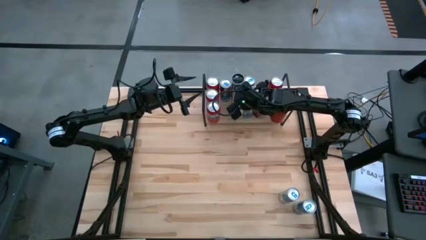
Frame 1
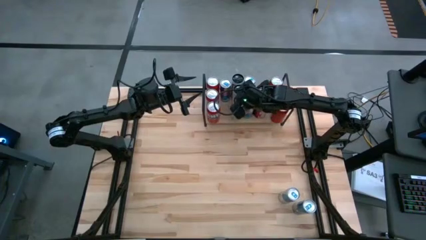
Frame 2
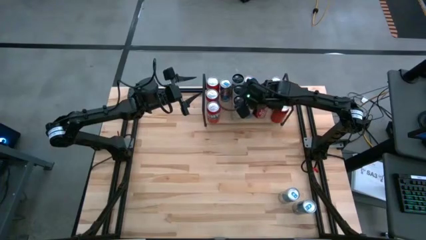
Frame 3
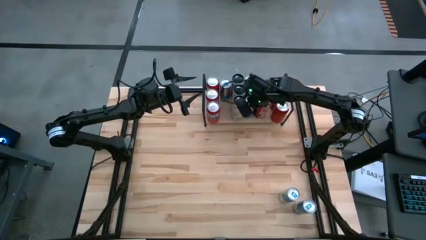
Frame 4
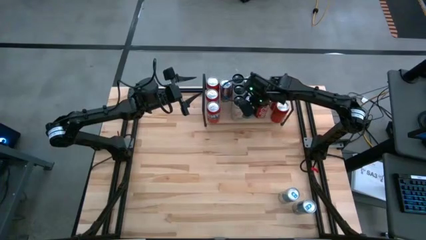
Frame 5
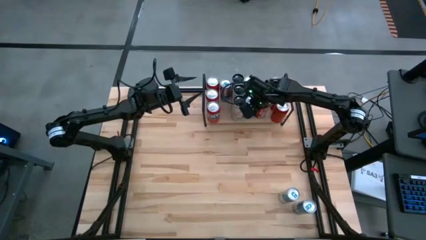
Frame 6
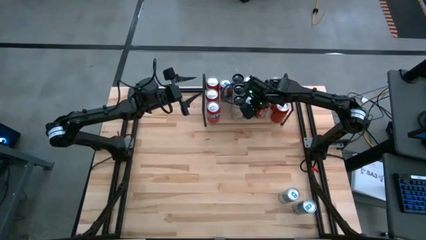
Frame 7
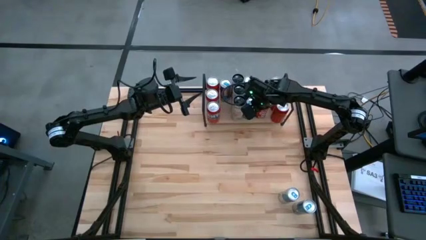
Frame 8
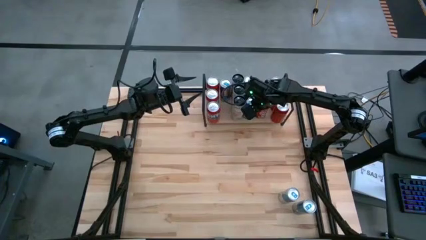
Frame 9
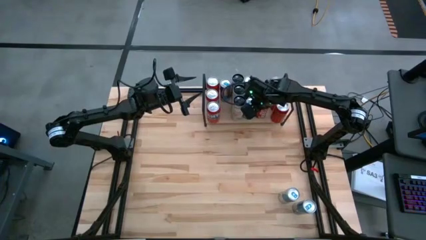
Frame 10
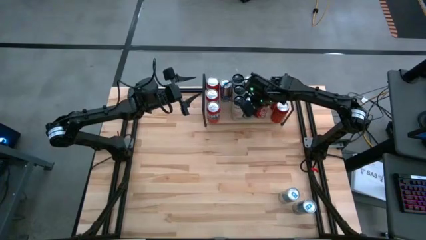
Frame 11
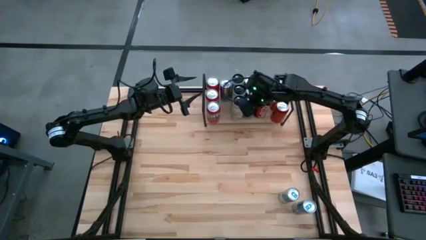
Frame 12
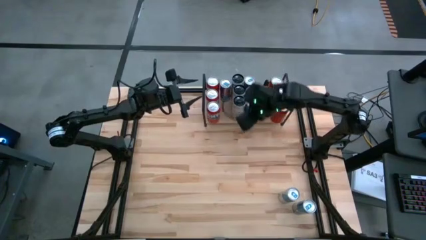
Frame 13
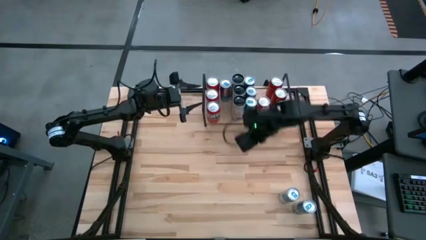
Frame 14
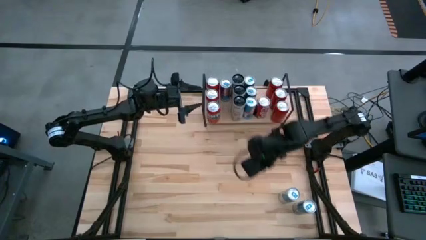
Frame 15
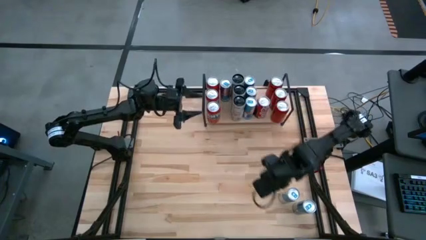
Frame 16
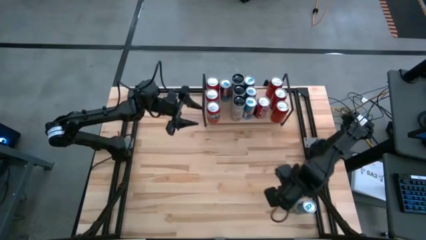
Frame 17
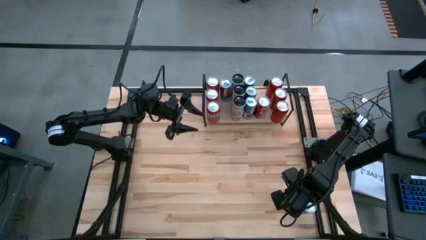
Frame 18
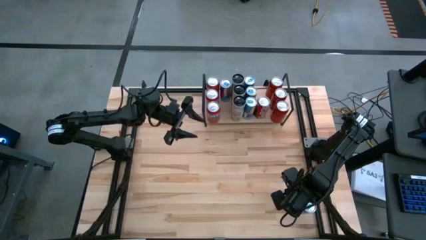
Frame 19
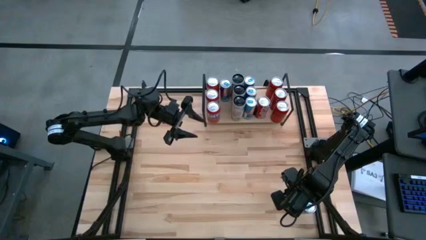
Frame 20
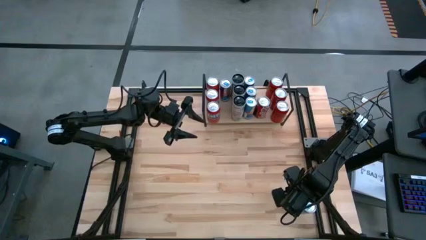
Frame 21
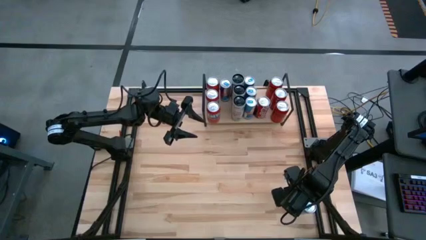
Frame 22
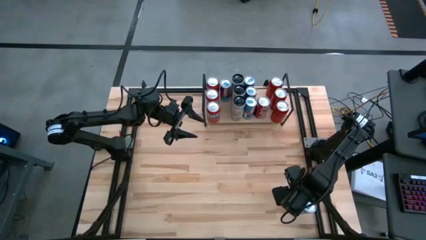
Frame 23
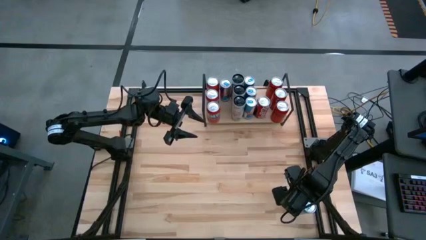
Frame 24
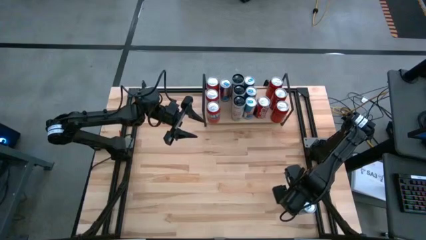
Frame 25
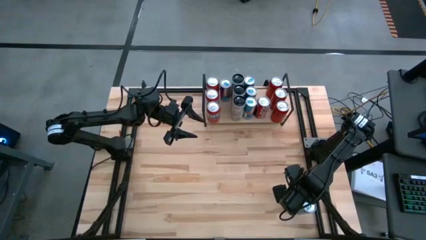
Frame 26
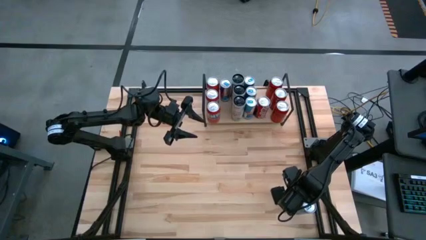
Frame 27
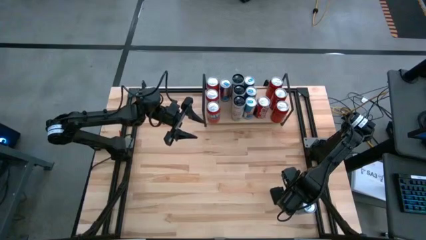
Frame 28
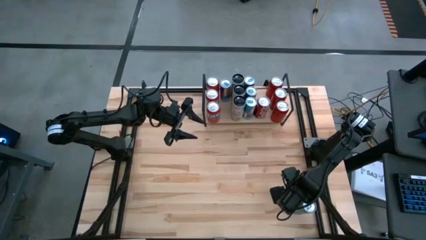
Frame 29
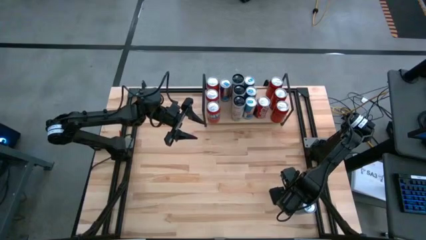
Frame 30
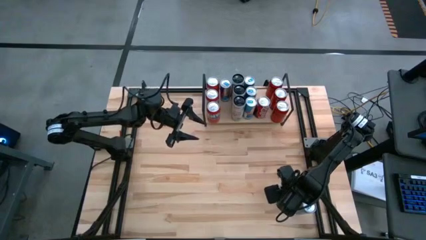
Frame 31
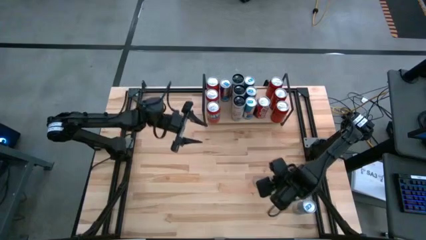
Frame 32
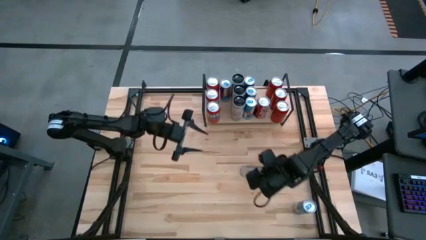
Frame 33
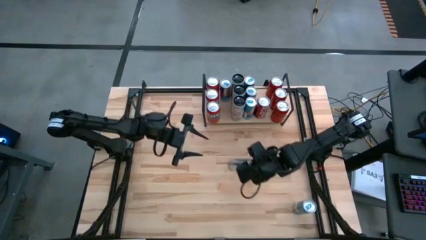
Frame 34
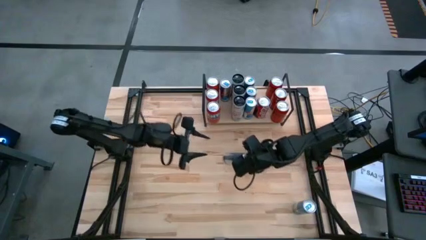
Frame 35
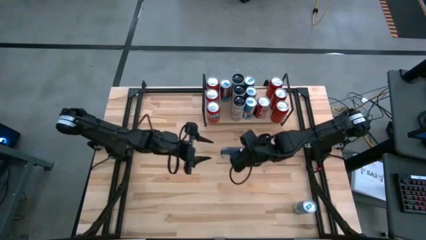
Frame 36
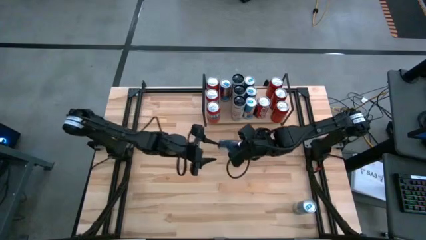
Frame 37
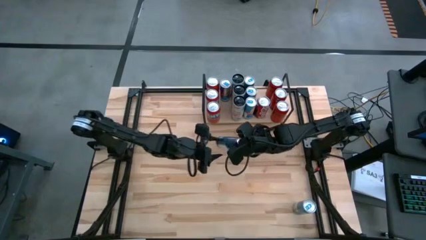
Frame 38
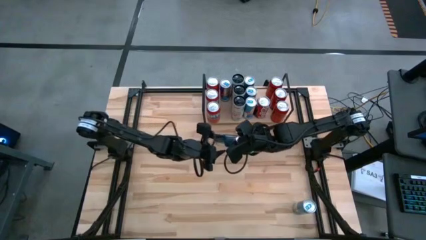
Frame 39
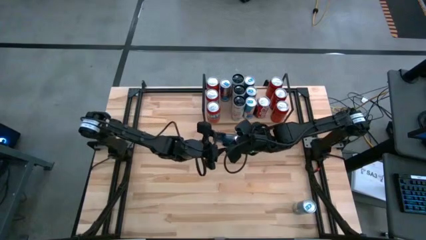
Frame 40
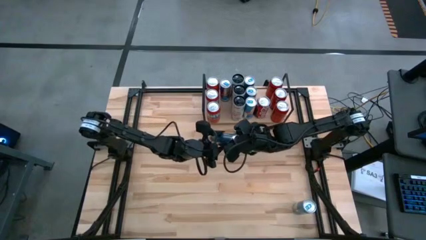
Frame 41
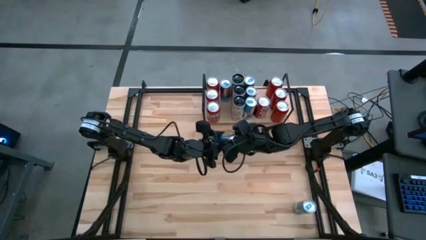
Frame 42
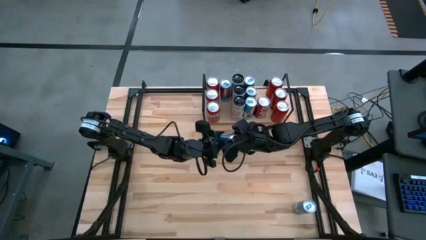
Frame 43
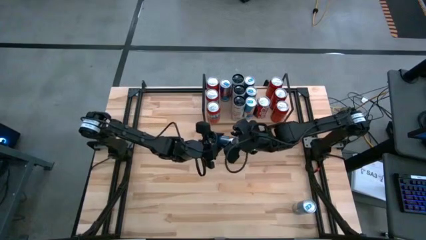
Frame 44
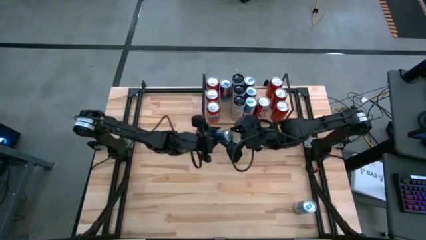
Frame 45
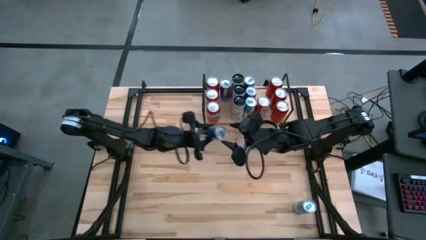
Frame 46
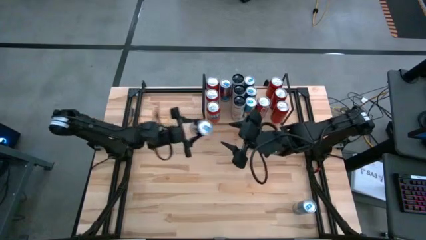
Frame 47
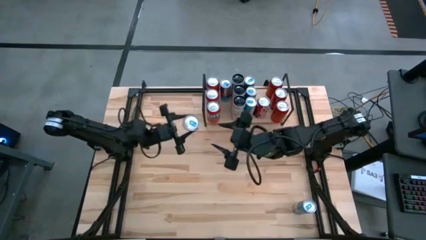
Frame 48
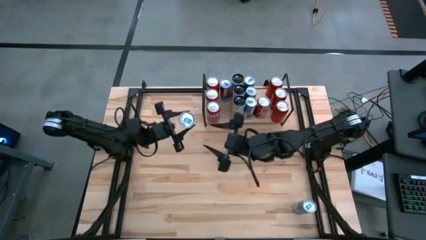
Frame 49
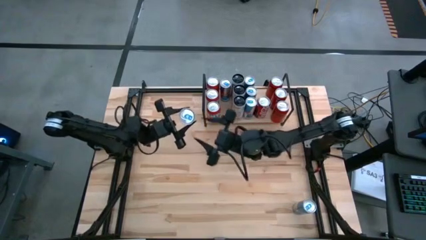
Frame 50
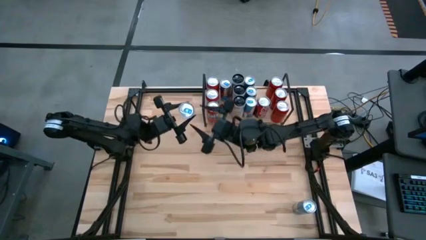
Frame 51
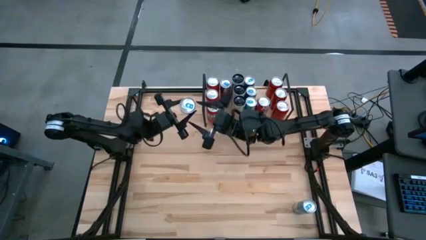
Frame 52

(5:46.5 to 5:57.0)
Task: Place canned beverage on shelf
Put the blue soda can on the shelf

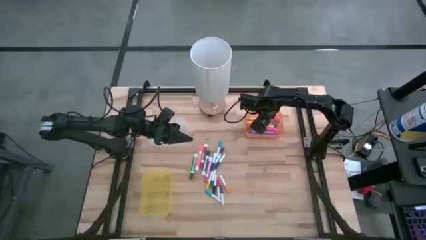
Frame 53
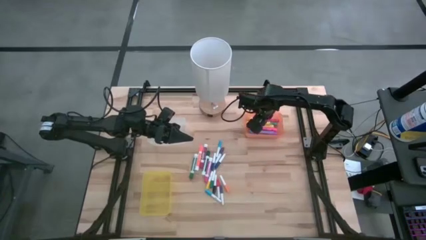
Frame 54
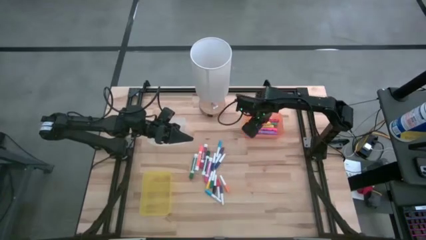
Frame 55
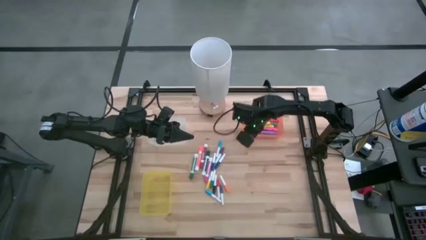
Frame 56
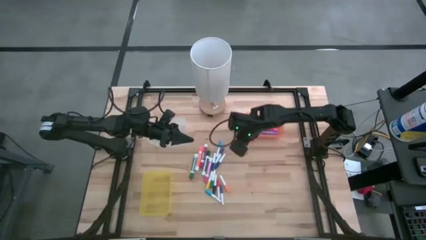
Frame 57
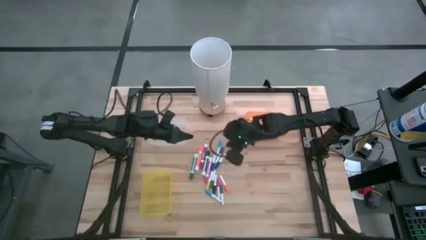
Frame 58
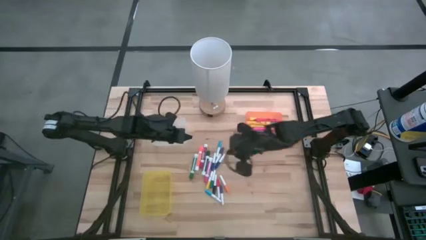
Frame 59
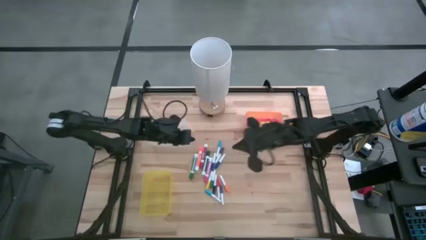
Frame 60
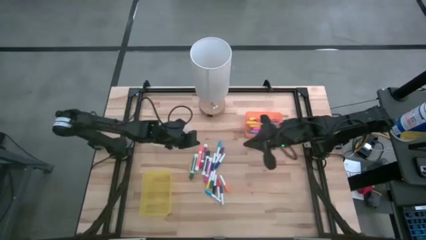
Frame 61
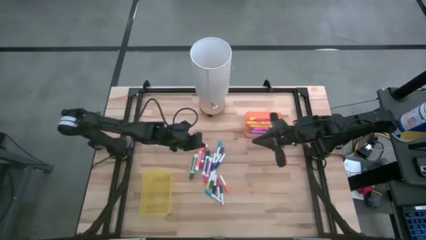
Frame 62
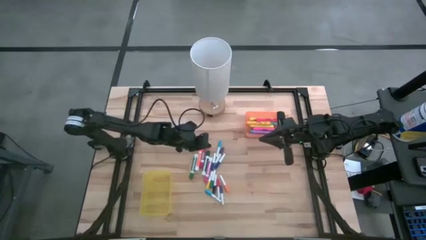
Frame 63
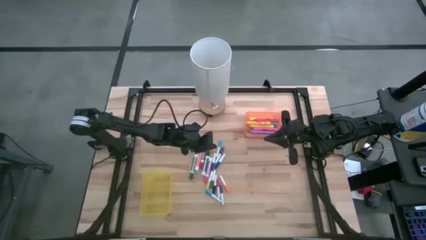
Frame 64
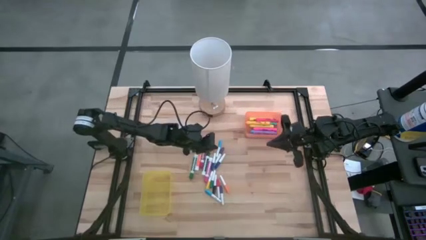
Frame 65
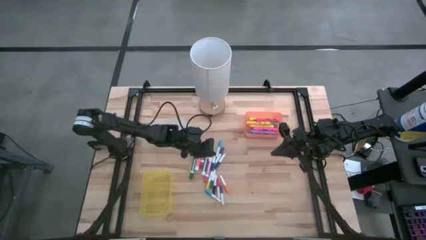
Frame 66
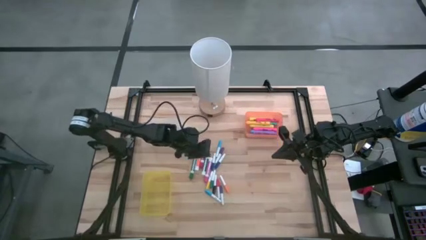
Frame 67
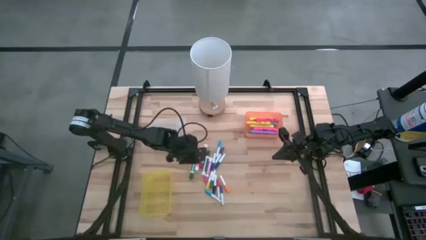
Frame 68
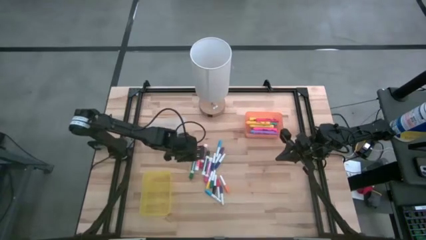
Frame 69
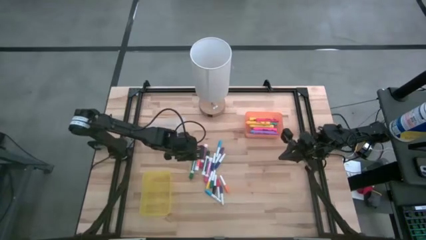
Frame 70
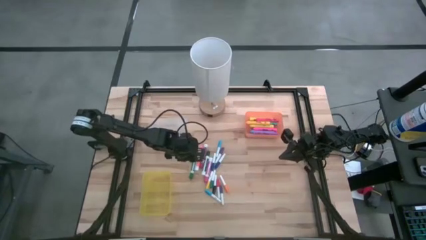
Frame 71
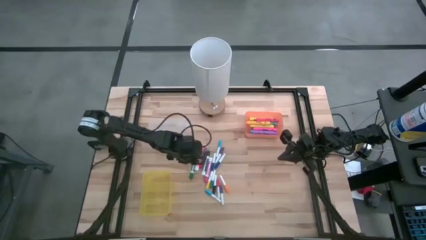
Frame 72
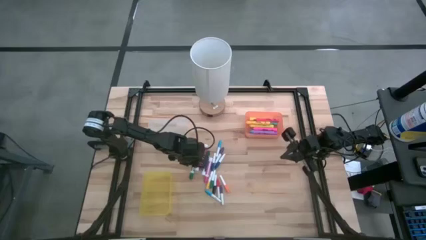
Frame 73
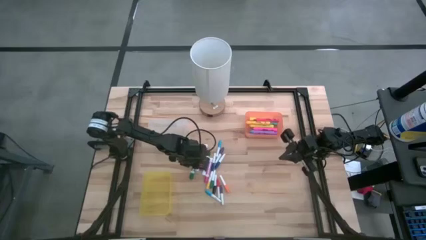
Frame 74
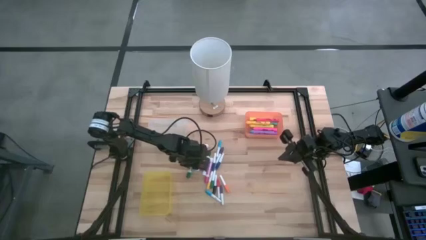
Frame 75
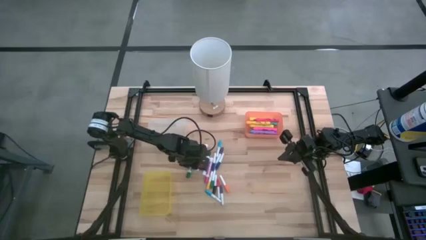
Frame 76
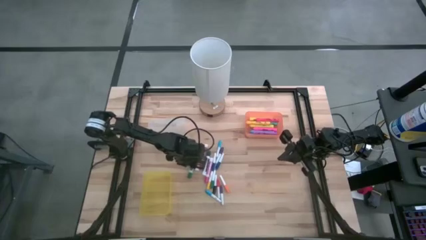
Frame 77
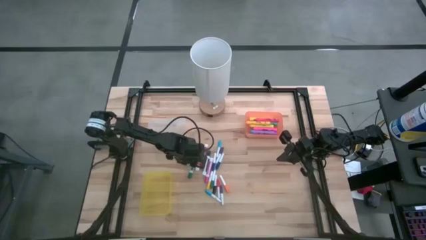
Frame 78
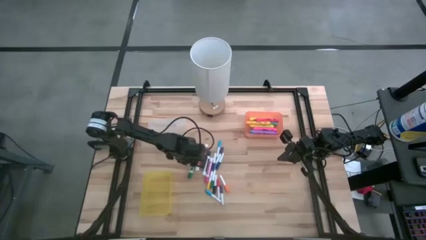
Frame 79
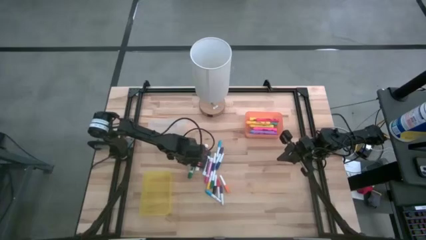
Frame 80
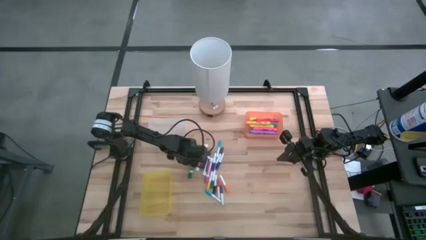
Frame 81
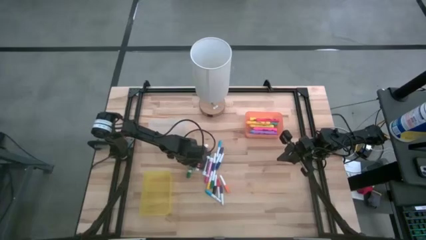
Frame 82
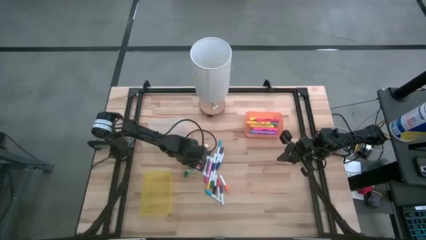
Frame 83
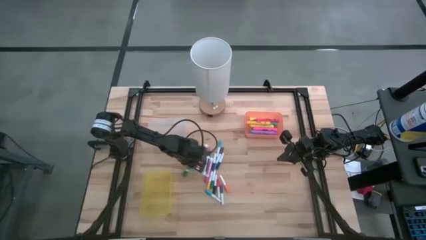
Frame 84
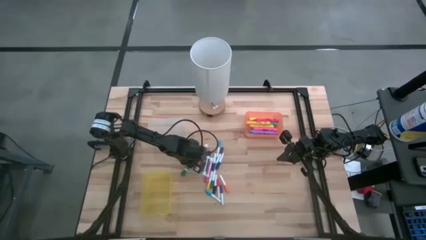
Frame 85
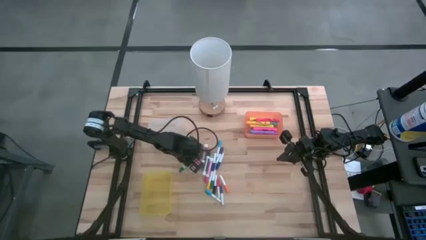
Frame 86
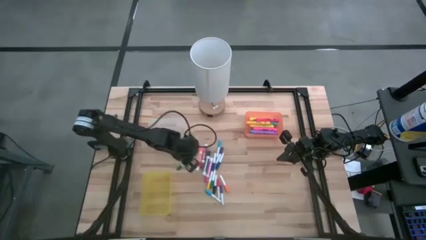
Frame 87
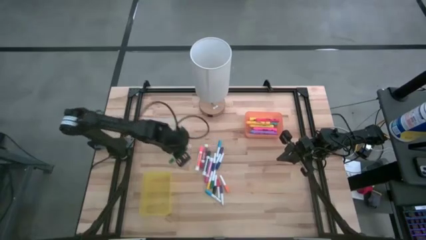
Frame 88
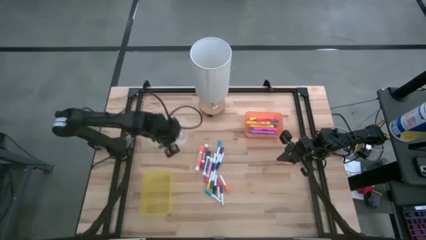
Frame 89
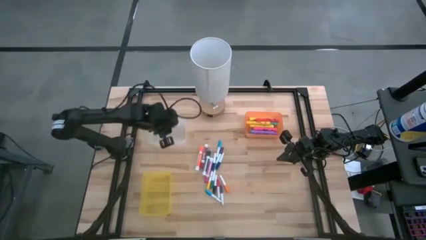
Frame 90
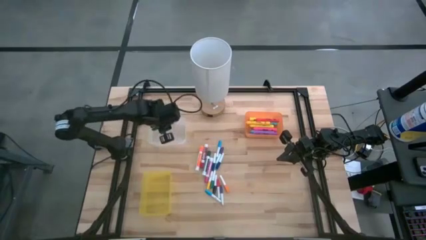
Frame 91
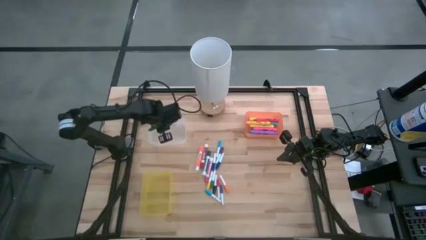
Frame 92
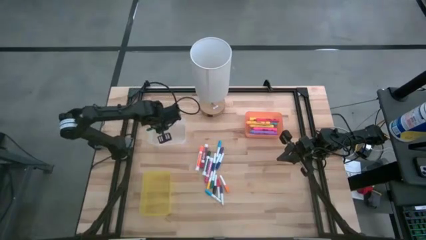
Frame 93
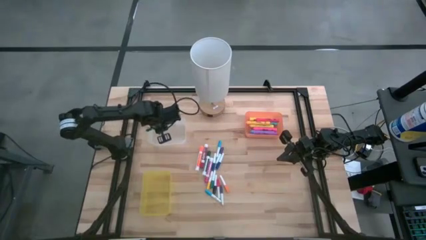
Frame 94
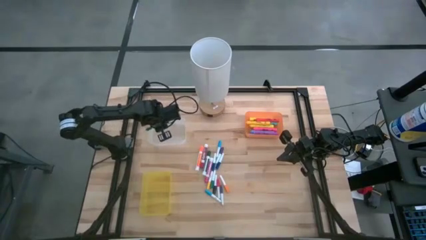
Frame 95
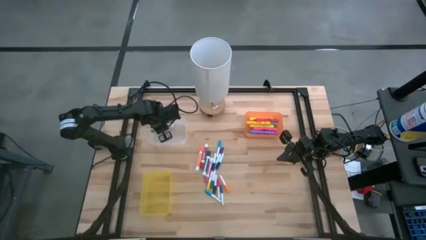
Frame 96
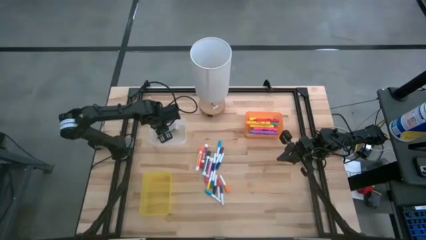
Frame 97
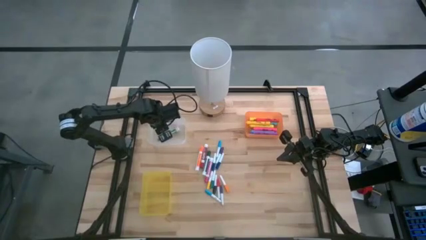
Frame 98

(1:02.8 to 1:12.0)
Task: Pick & Place Markers
Put the green marker pen into the white bin
